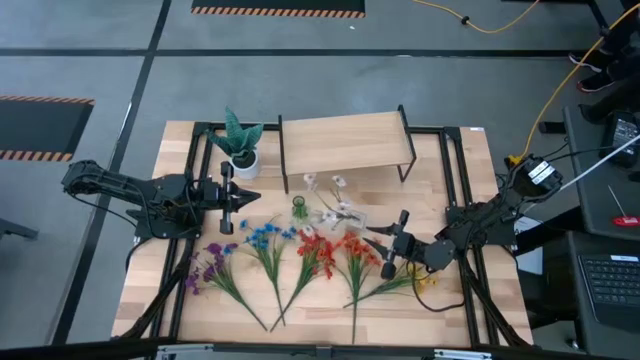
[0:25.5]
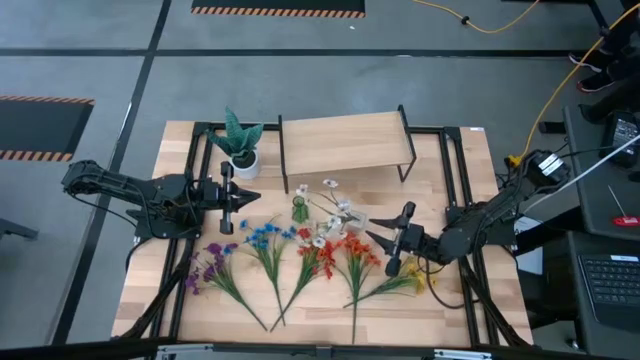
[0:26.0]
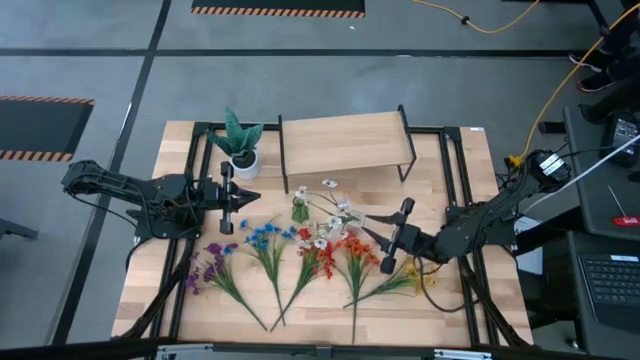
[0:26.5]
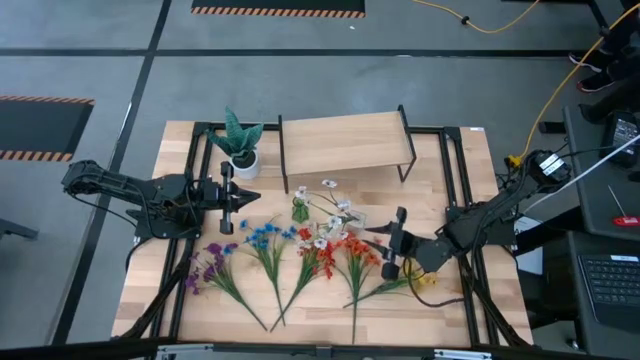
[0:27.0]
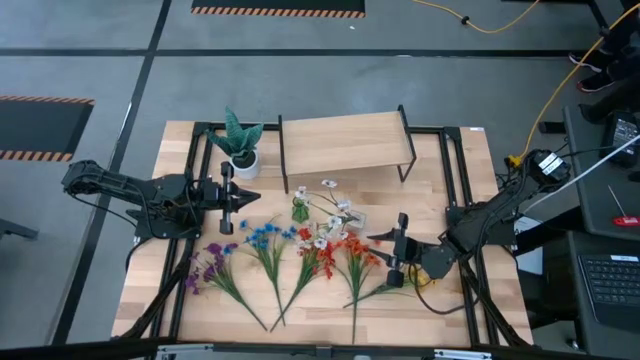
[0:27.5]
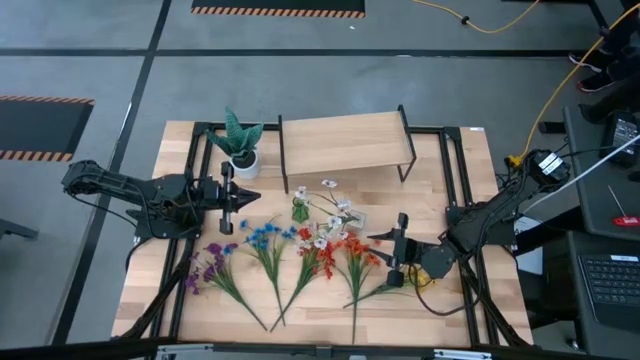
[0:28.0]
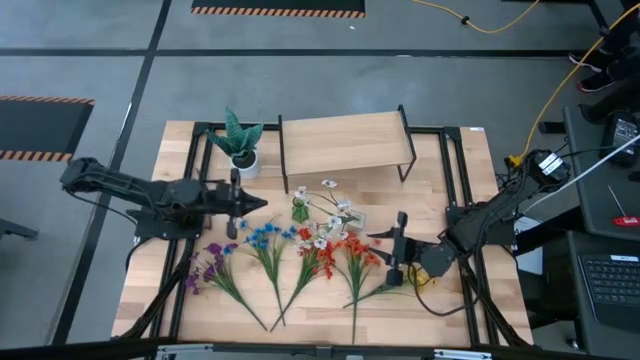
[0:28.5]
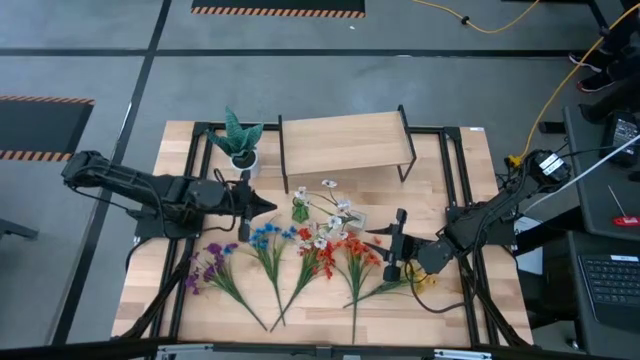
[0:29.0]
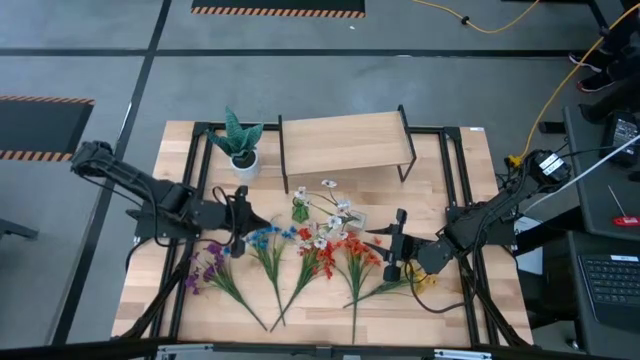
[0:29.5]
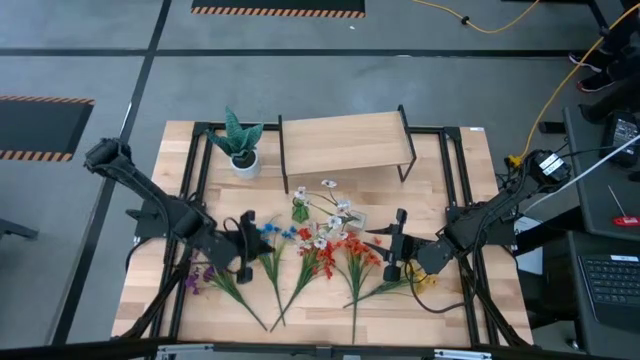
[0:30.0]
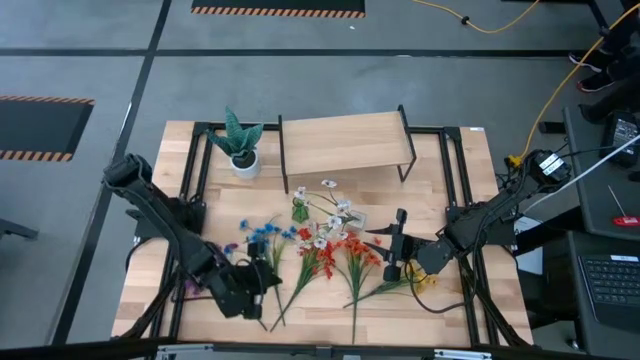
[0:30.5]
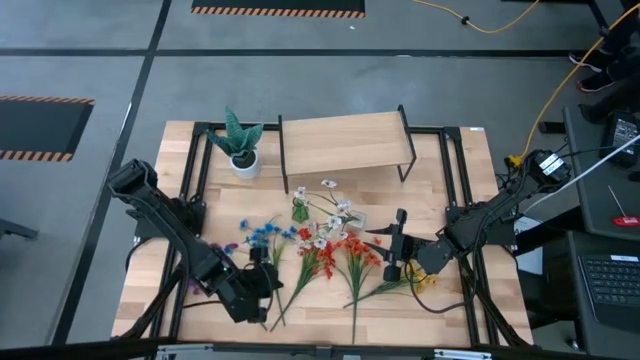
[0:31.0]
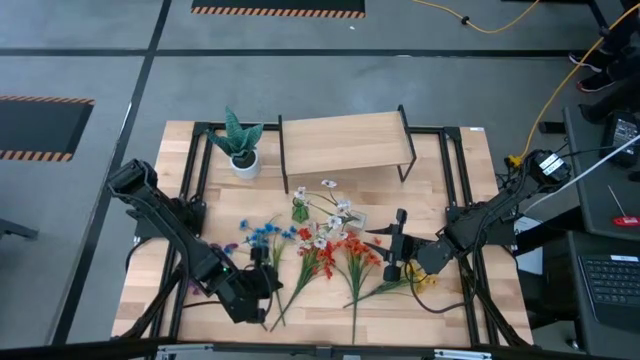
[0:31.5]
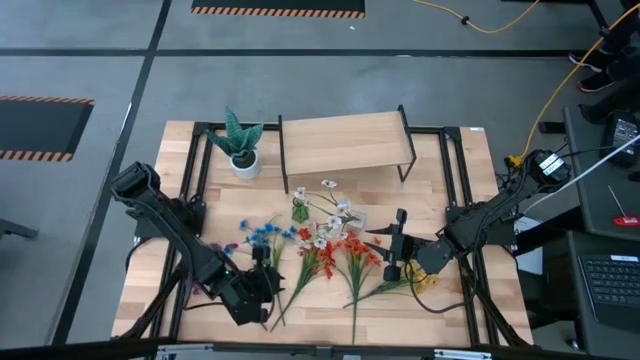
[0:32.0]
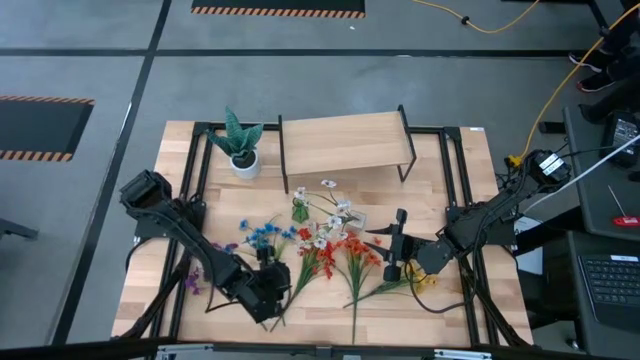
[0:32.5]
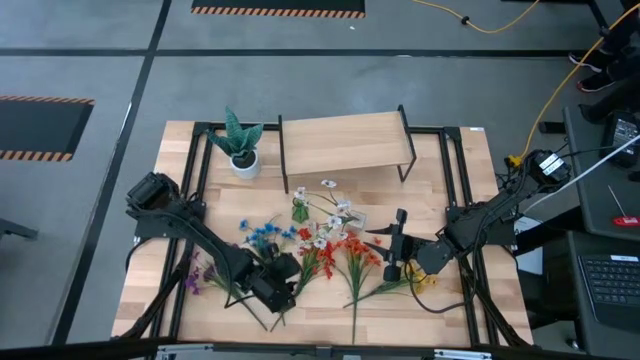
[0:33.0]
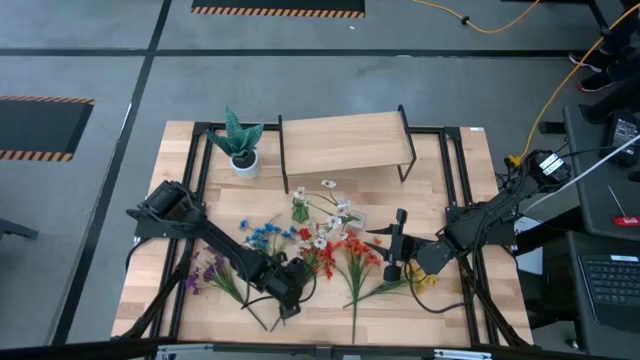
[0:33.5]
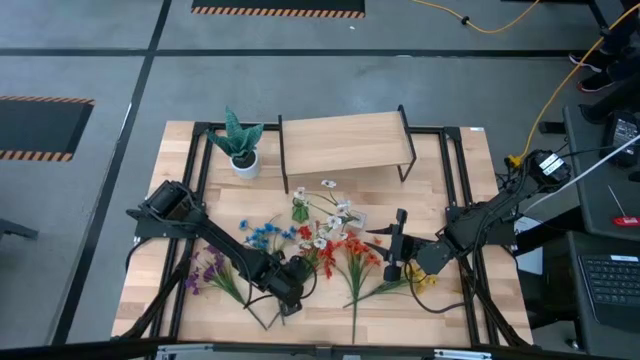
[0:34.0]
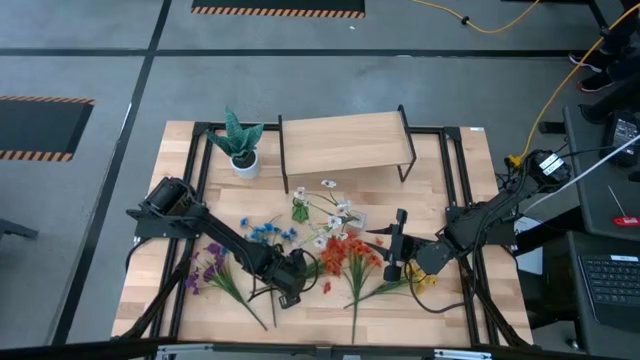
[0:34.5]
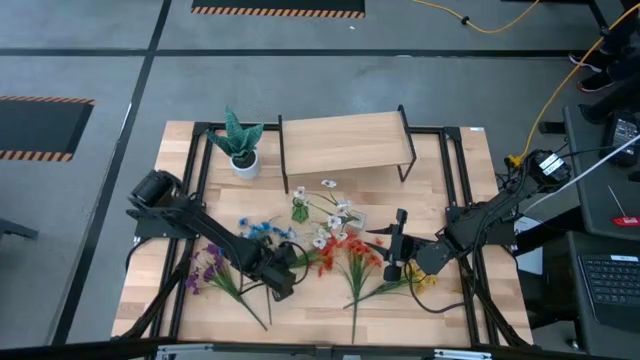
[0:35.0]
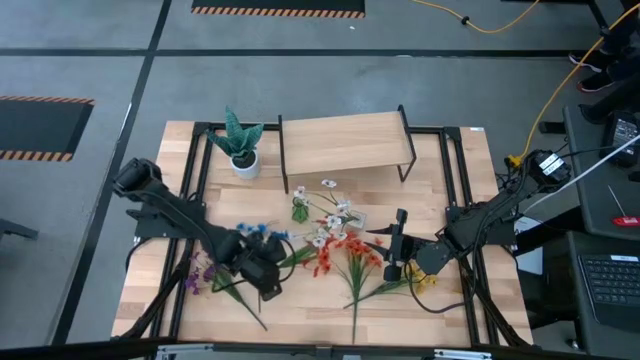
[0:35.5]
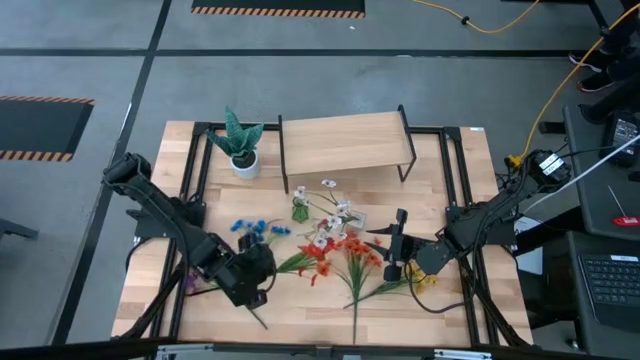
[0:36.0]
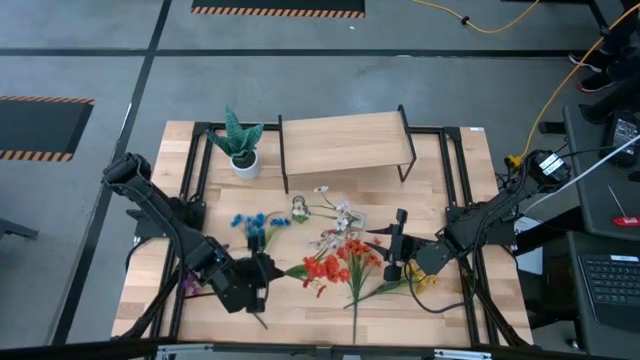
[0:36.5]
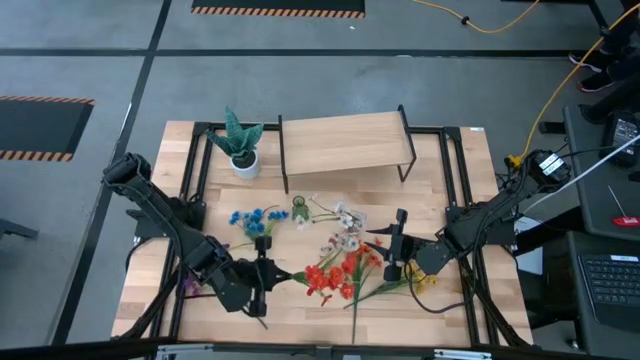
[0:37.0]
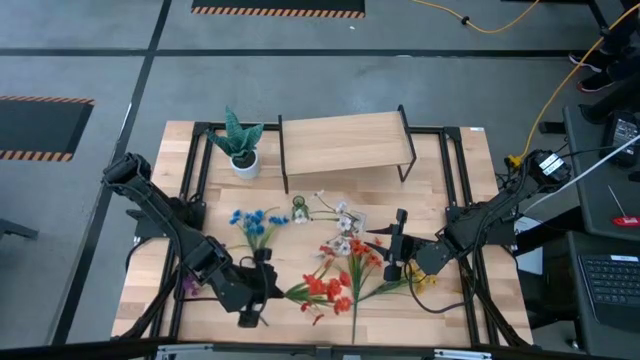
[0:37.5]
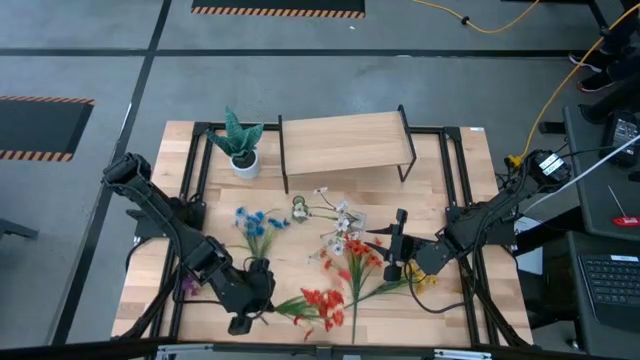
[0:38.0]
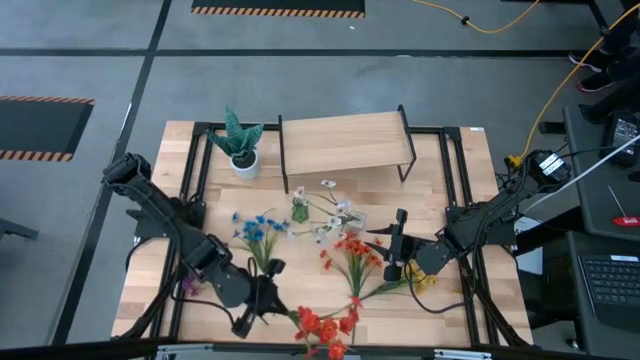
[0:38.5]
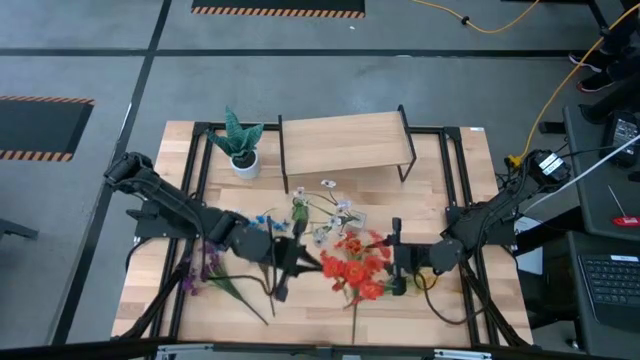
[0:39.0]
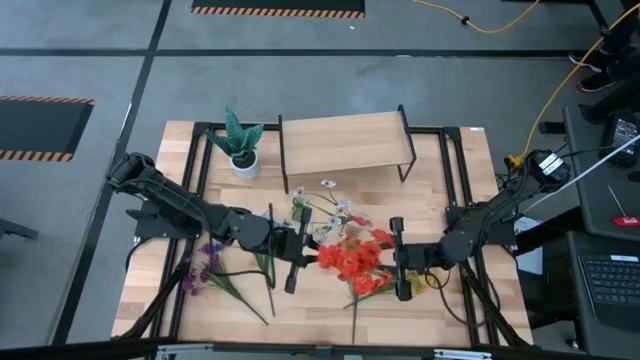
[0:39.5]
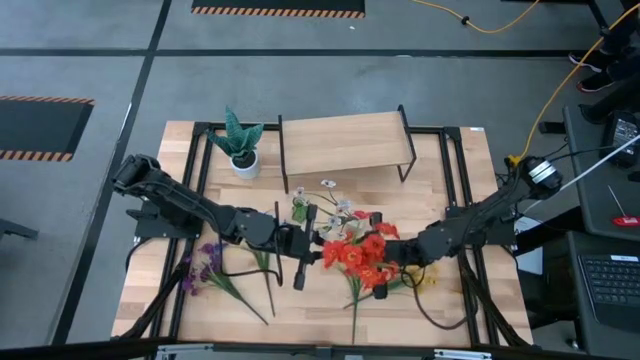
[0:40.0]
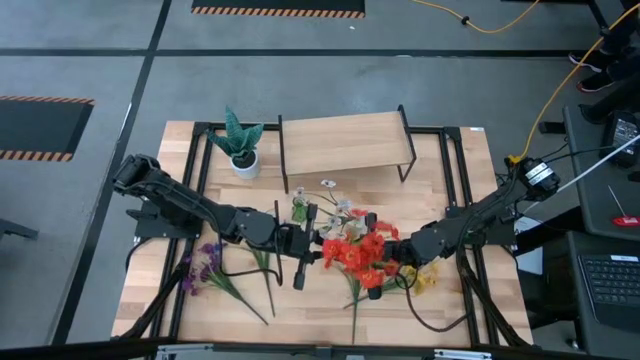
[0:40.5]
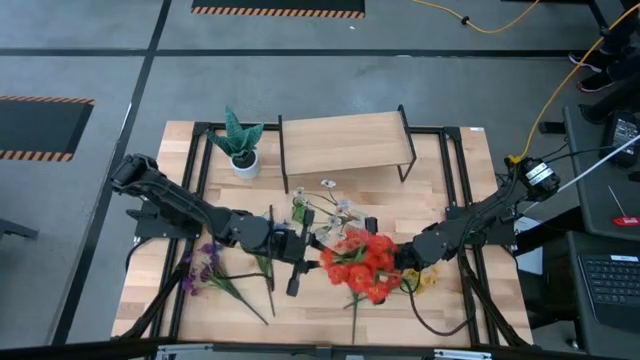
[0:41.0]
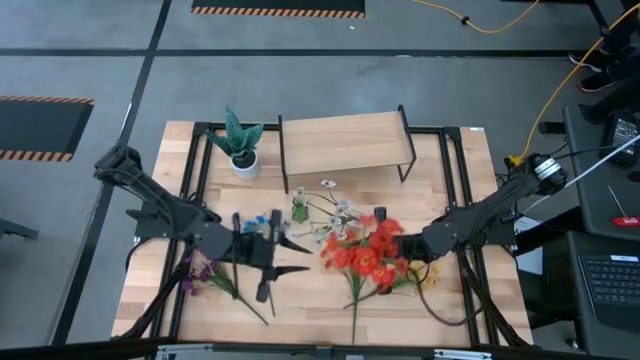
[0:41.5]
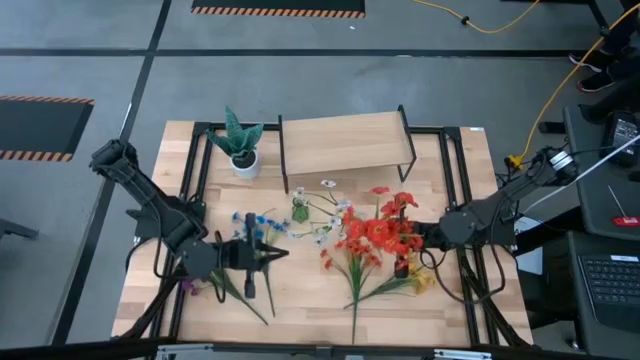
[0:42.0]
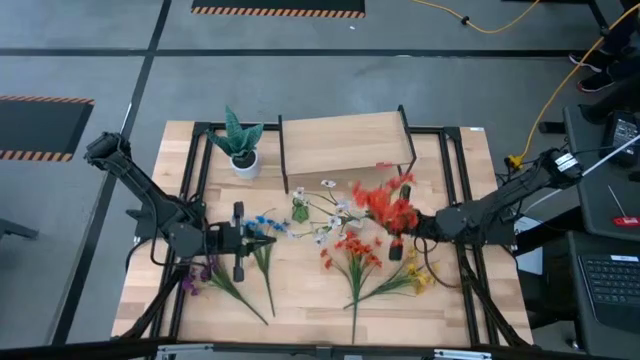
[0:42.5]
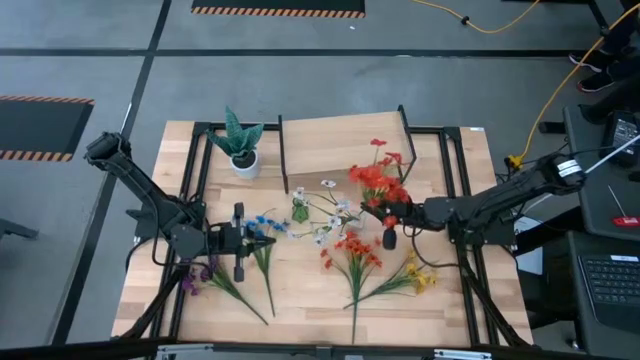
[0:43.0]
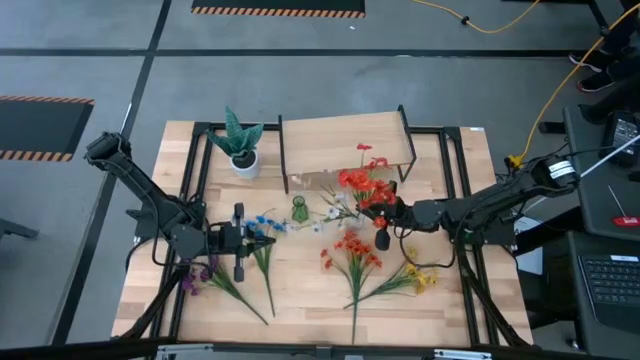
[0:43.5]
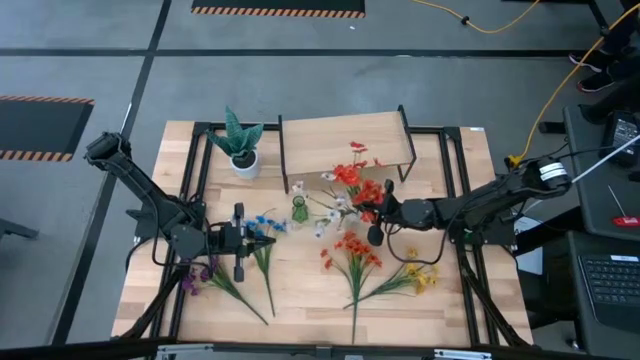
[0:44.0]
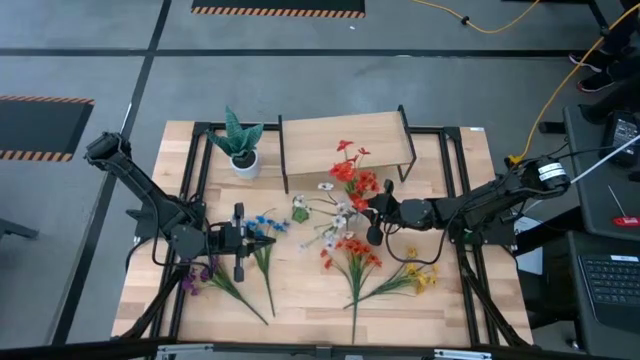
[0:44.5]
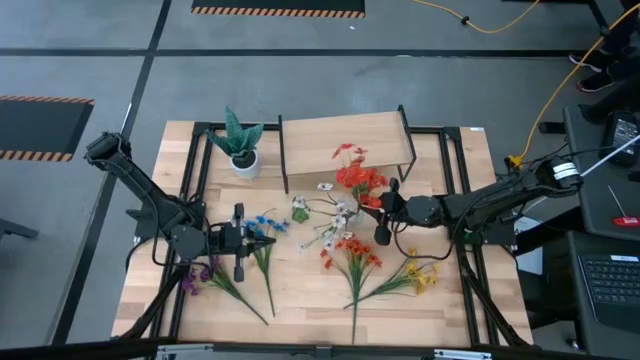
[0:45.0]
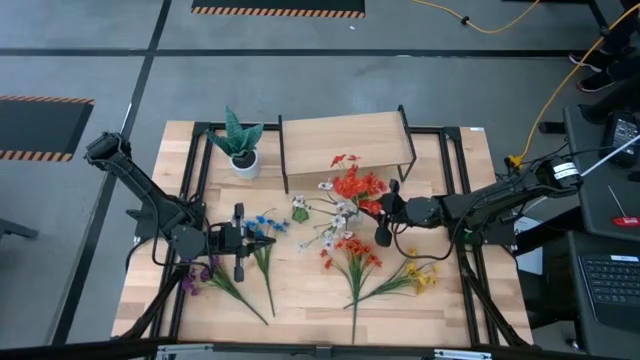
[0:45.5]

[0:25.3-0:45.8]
Task: Pick and place flowers into a vace then onto a shelf
Put the left orange flowers into the transparent vase

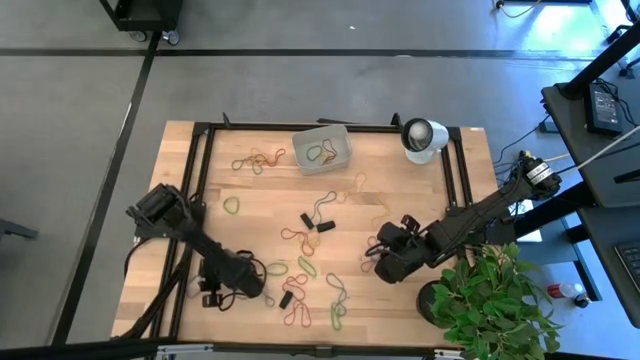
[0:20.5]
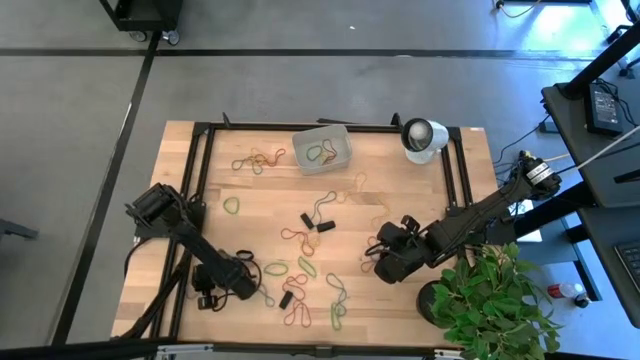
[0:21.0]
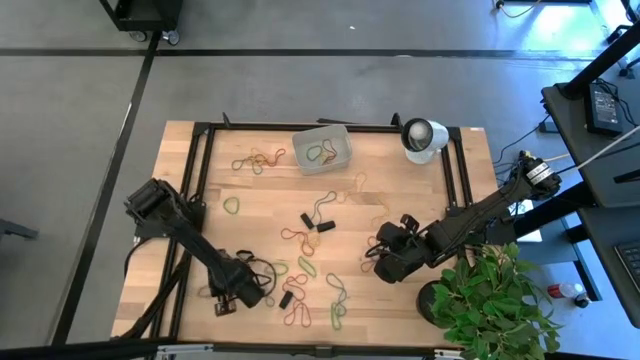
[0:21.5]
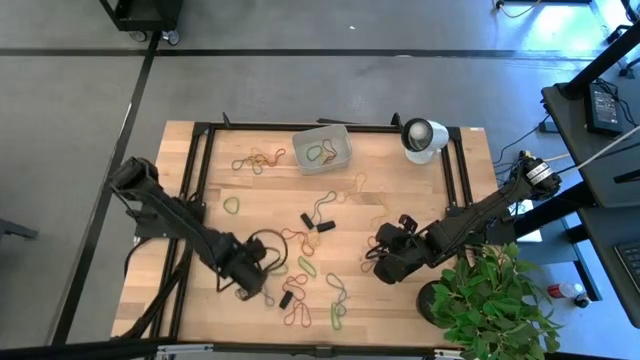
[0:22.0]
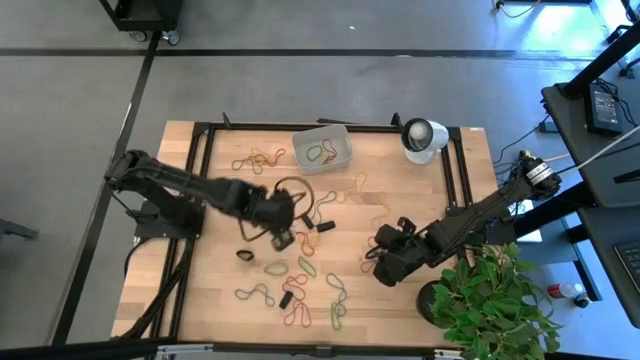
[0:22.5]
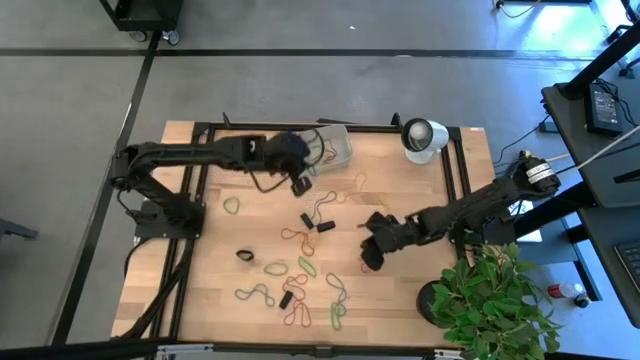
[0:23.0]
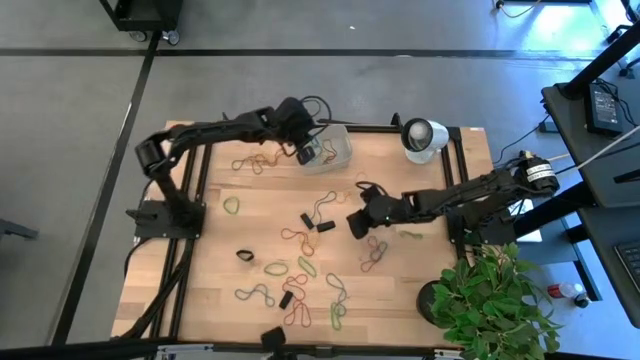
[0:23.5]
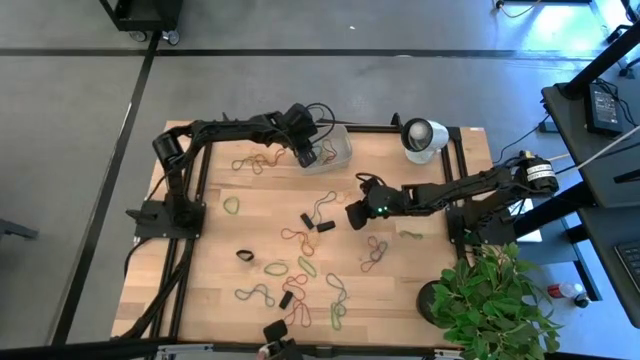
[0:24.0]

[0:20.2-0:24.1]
Task: Pick and place rubber bands into bin
Put the blue rubber band into the gray bin
